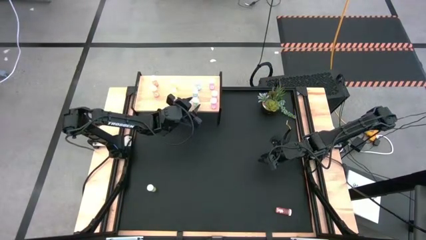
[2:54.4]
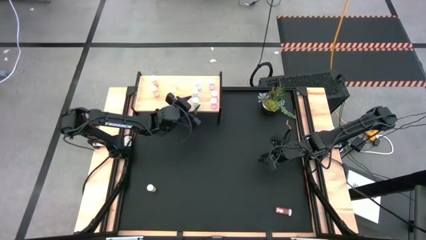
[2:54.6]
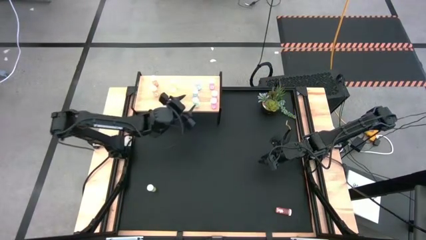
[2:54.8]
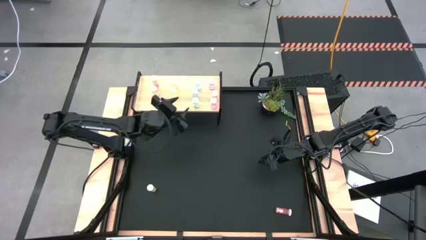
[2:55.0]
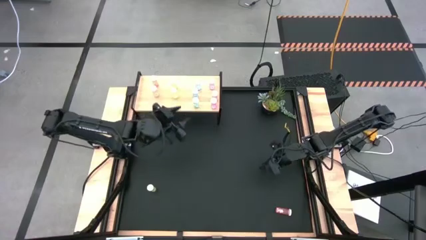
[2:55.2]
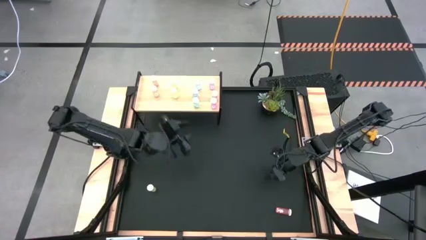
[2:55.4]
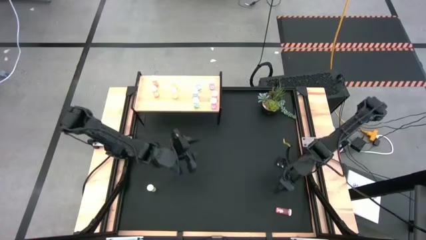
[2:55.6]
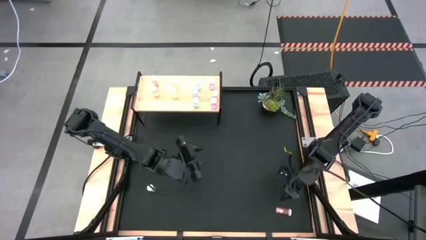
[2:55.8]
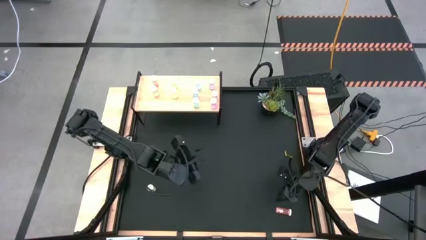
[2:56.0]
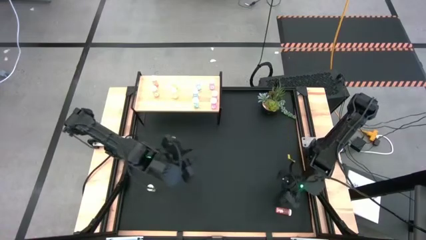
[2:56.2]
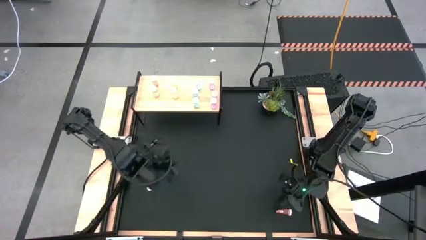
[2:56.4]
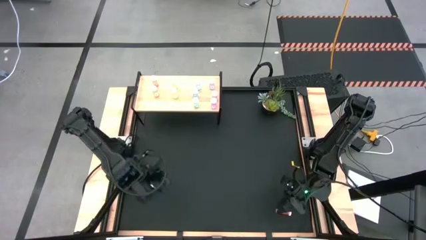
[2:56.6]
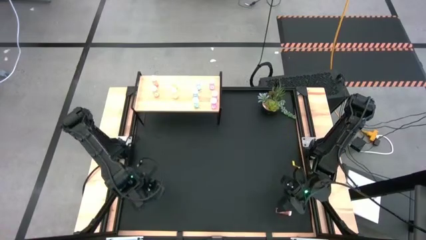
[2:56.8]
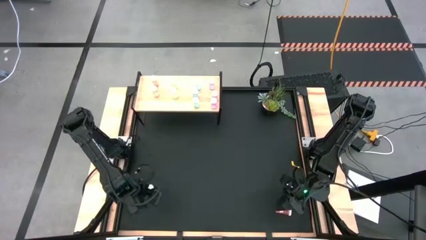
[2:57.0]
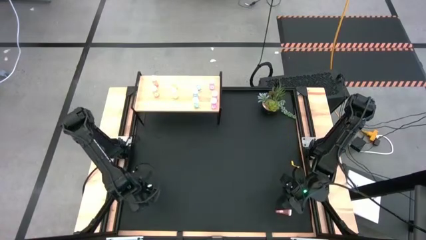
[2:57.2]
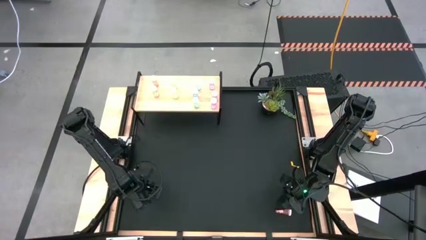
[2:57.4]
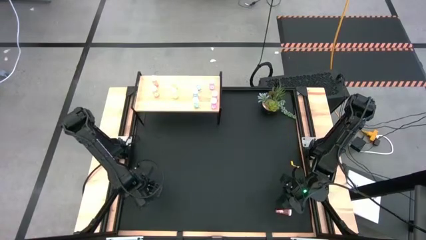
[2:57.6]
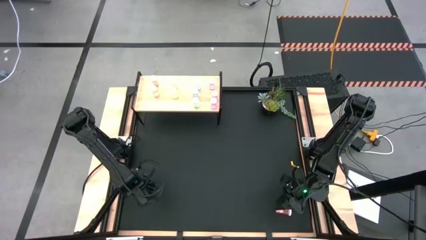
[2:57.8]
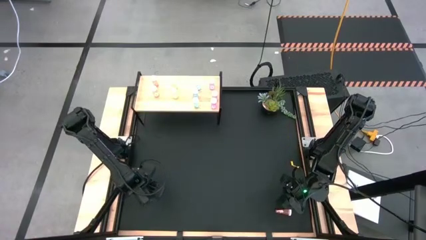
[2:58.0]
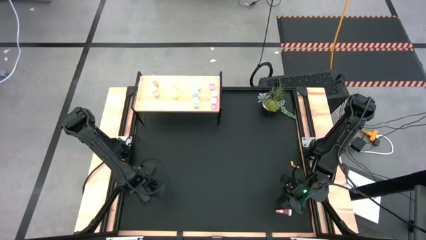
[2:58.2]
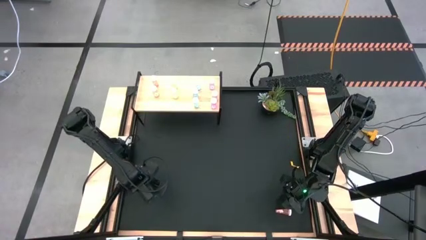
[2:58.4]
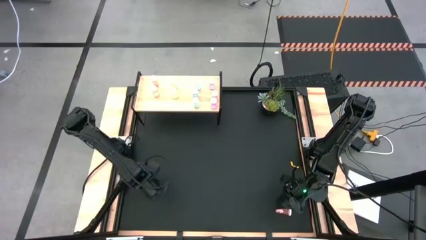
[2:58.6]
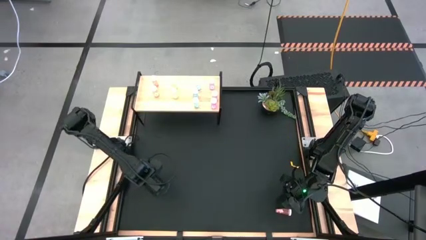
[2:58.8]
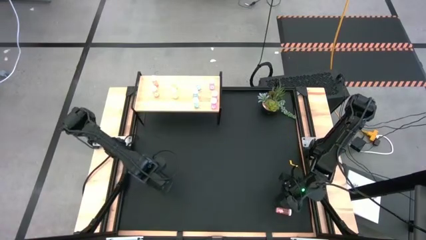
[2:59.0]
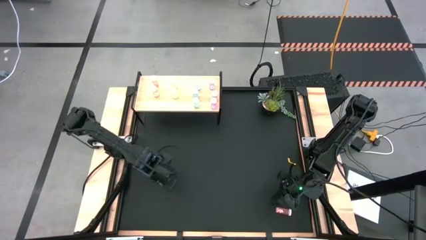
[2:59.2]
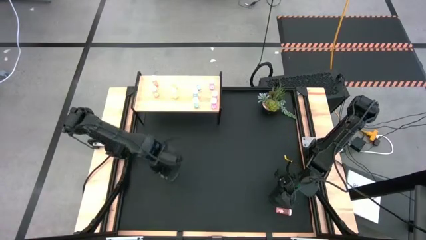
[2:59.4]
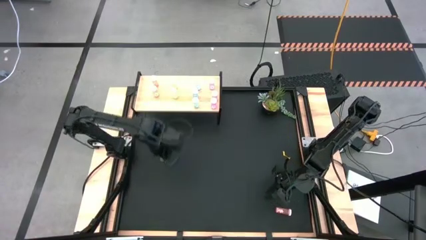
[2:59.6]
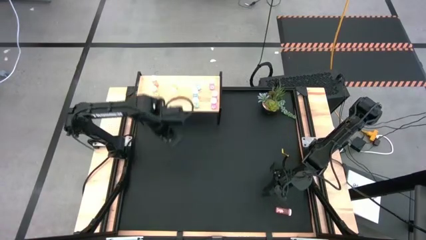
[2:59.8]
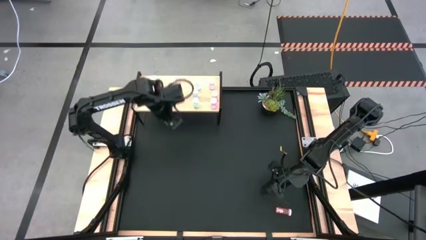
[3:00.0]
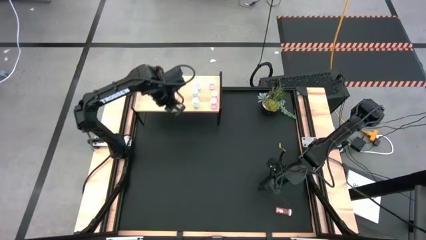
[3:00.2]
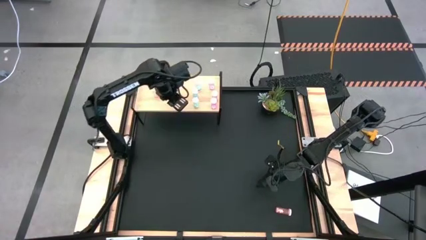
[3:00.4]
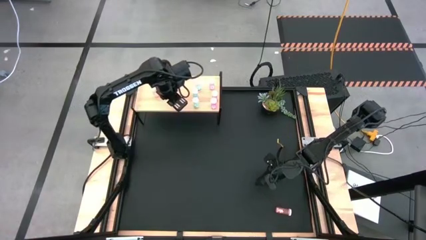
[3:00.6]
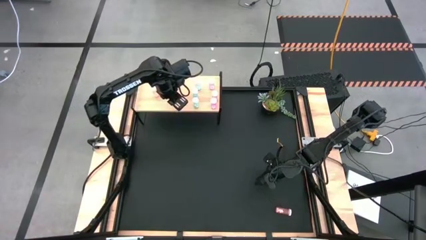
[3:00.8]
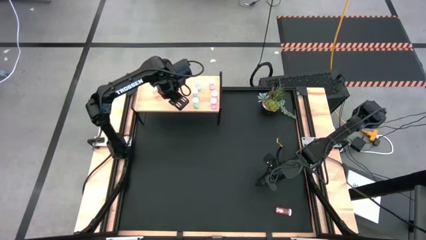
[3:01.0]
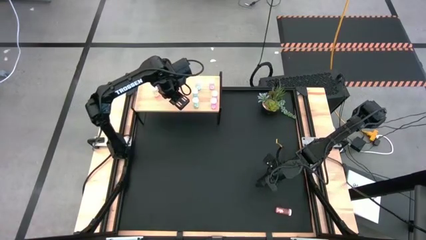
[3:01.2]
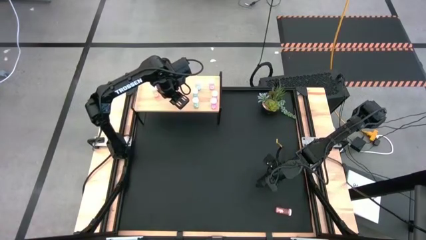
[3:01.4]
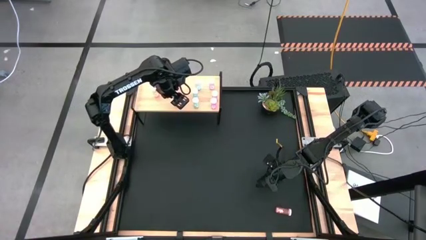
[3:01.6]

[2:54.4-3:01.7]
Task: Pick and place medicine bottles onto shelf by color
Put the yellow pill bottle on the shelf align with the other yellow pill bottles

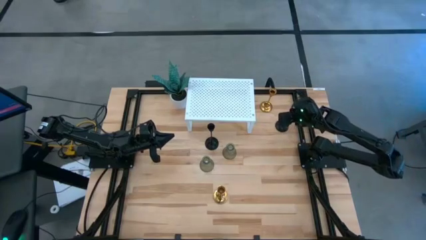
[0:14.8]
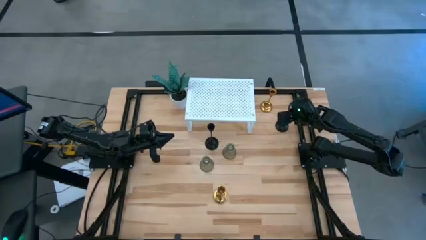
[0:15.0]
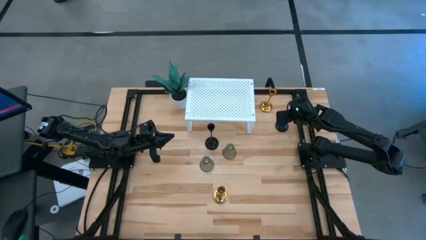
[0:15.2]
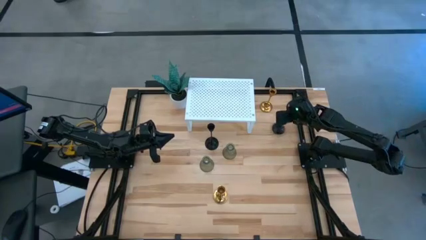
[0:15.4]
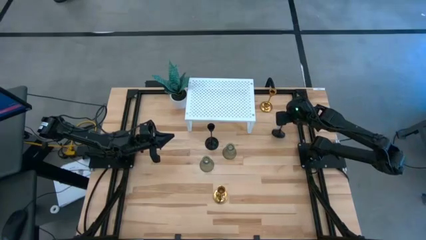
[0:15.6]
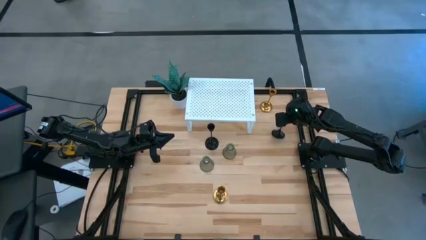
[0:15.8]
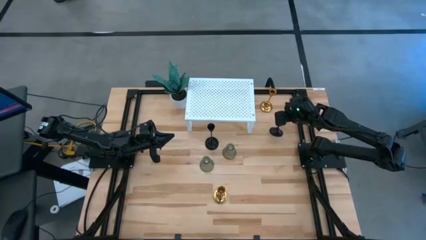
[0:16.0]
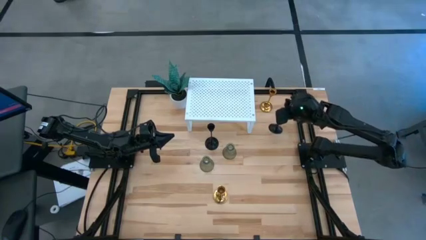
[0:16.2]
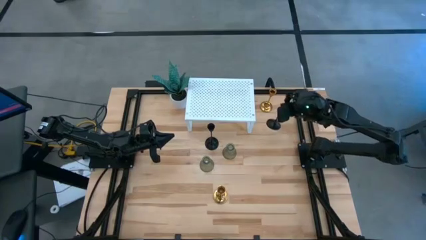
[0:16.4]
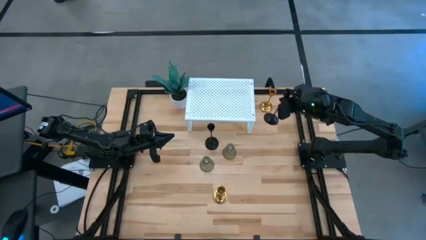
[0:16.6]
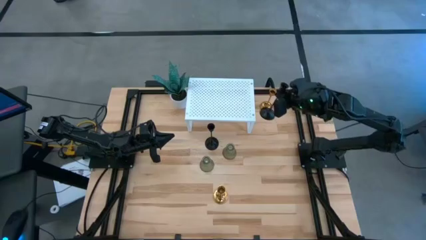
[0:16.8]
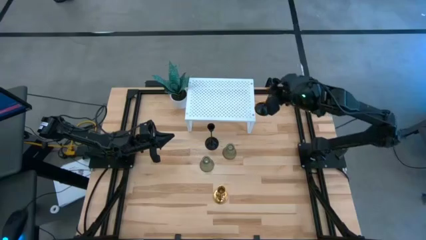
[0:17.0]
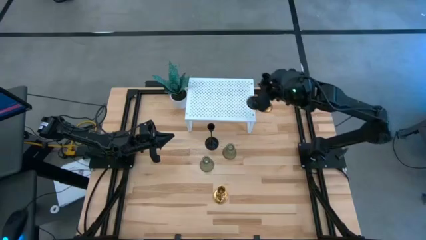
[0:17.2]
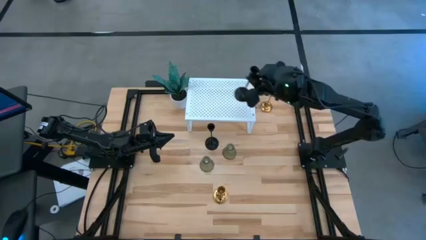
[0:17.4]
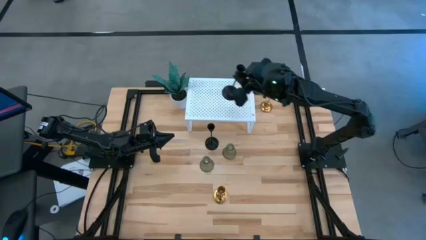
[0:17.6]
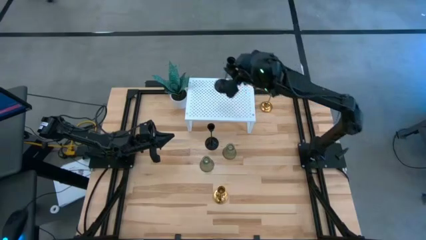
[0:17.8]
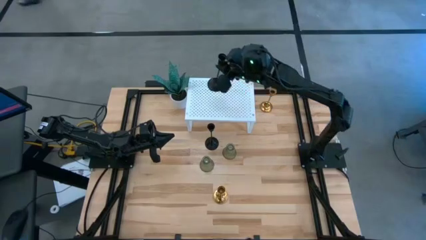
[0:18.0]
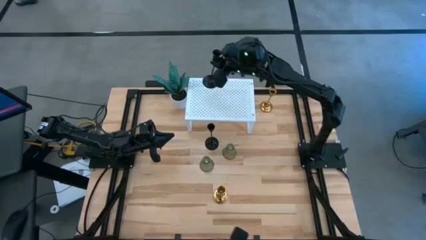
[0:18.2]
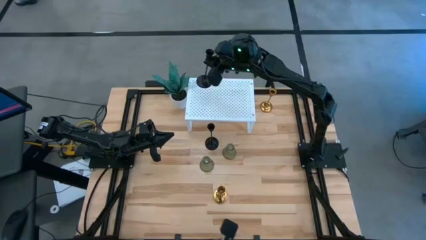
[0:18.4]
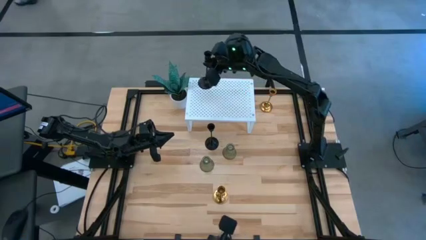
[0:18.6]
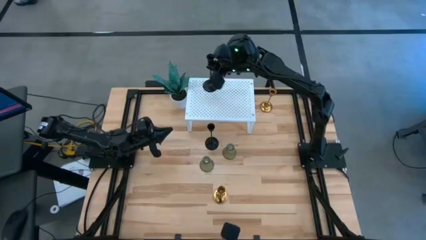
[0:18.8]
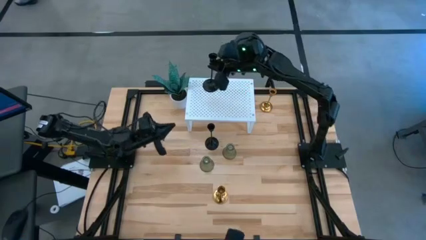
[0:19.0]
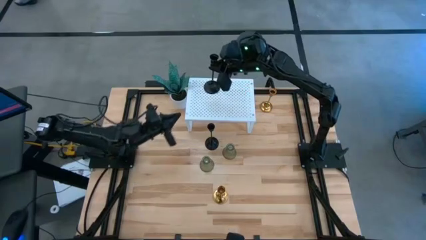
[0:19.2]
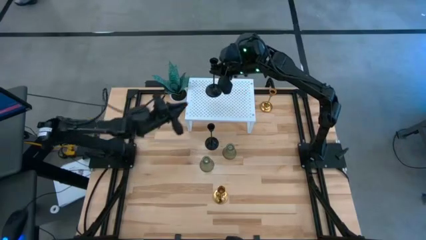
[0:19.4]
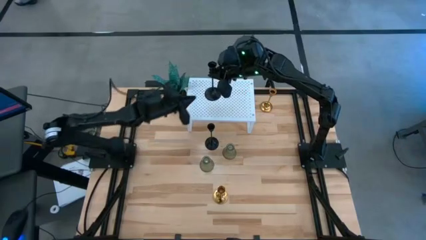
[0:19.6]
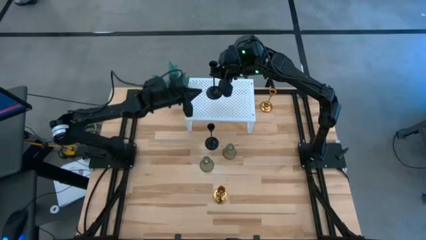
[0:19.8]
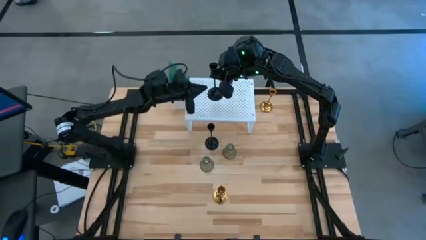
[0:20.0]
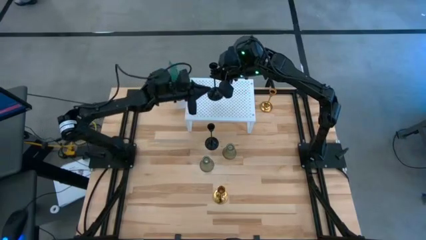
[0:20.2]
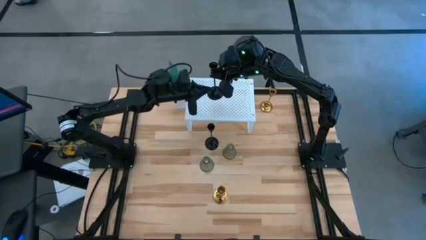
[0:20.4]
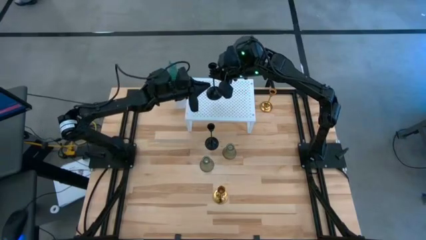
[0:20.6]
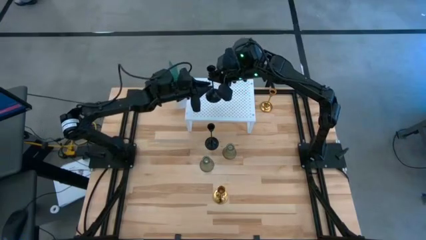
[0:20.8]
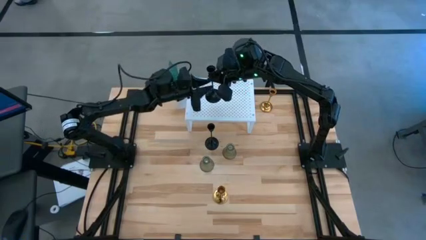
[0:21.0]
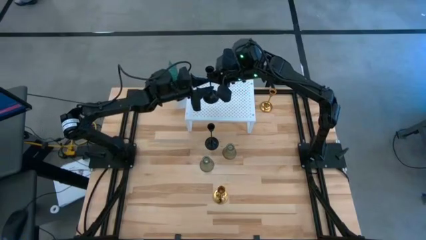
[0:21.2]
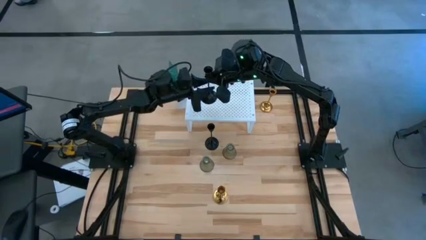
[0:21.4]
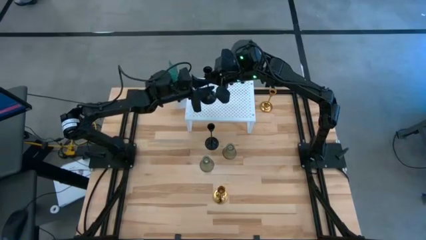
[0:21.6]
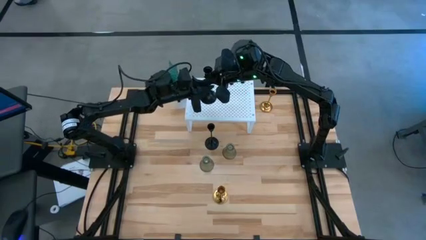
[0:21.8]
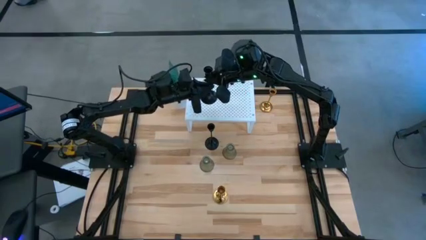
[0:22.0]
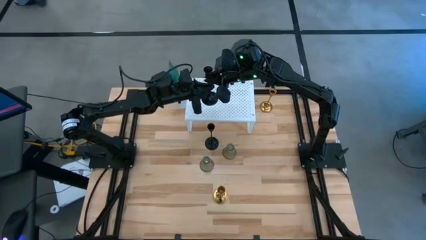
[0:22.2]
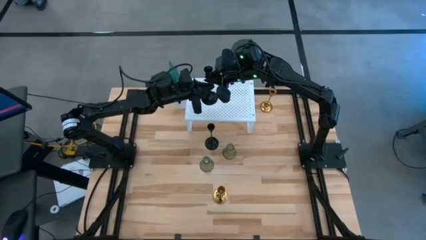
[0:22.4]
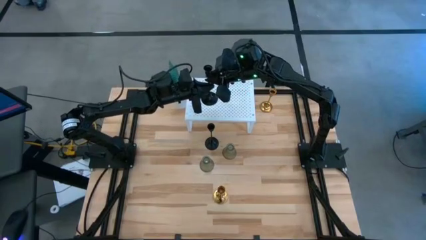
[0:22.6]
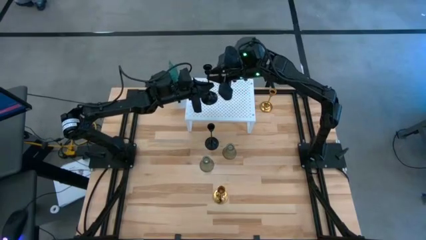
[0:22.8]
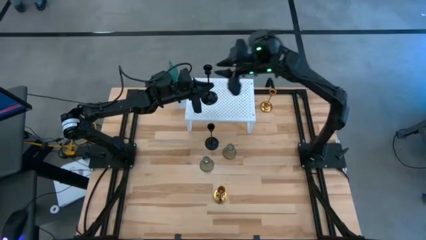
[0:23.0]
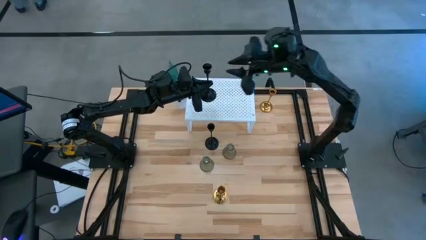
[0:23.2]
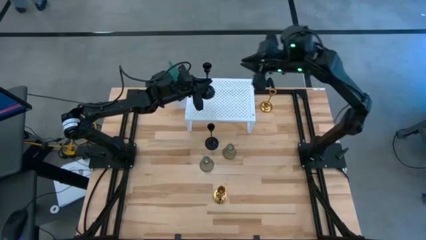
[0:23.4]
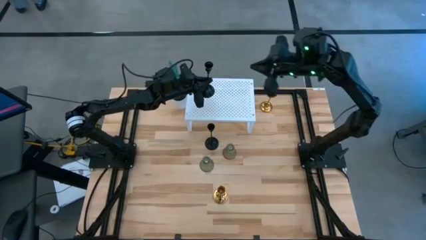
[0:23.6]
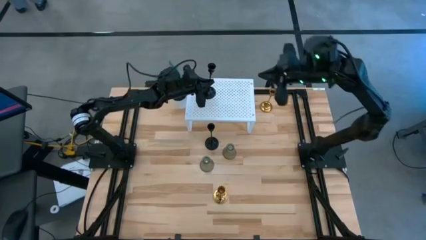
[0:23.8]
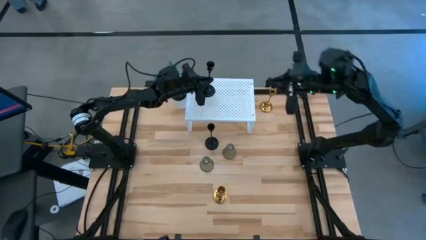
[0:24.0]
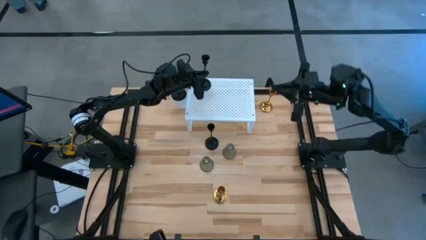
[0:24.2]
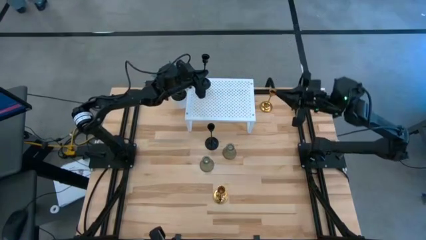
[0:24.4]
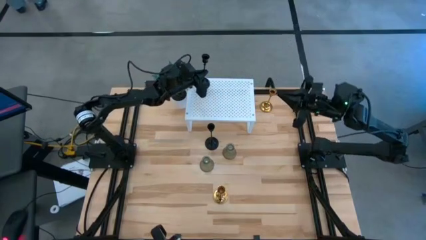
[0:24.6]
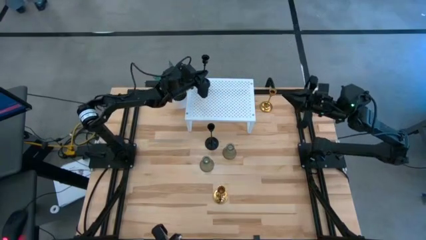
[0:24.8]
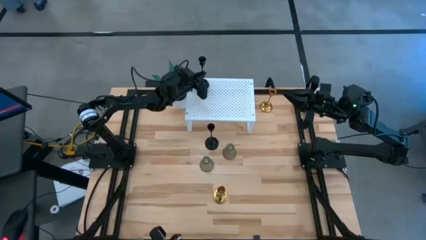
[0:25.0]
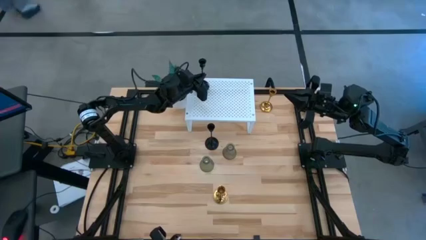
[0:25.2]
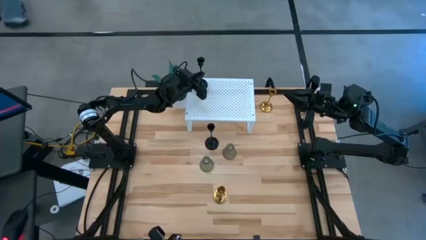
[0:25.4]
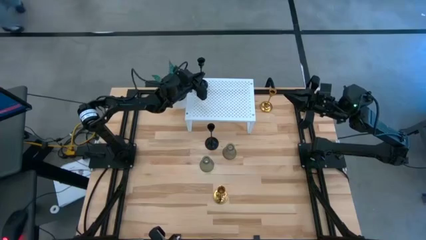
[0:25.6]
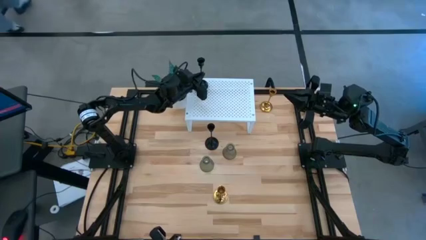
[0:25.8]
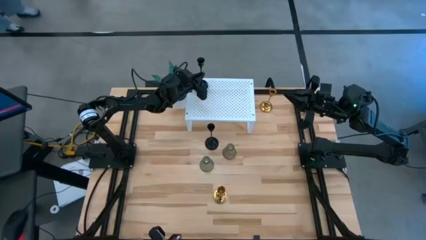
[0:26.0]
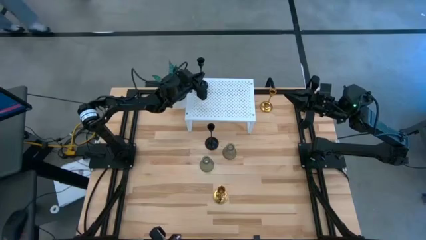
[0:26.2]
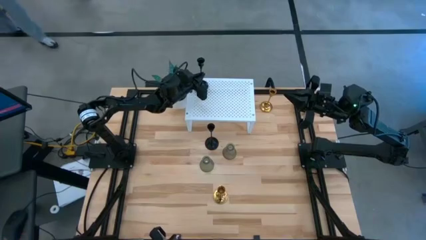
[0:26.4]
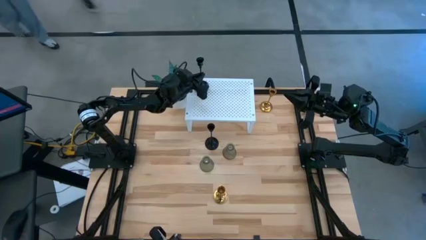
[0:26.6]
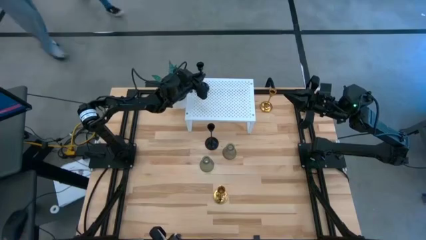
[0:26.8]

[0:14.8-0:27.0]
Task: Pick & Place candle stick holders
Put the right black candle holder on the shelf
